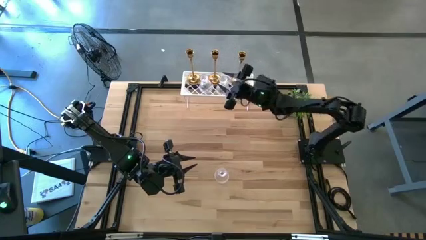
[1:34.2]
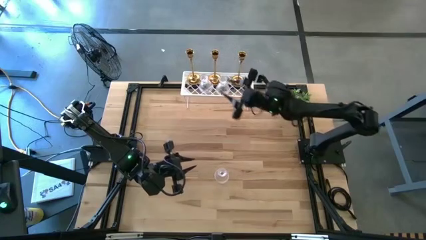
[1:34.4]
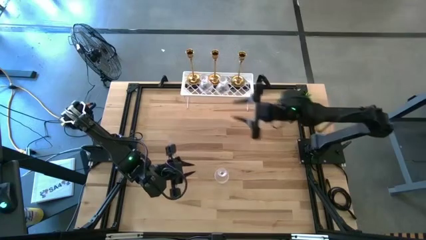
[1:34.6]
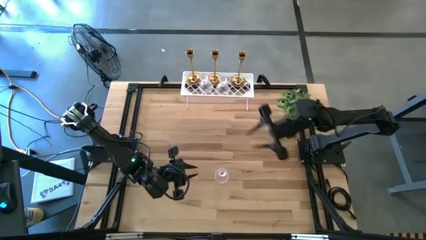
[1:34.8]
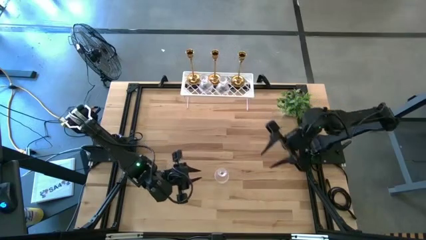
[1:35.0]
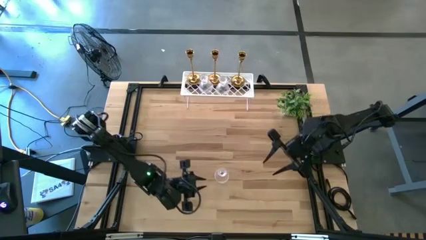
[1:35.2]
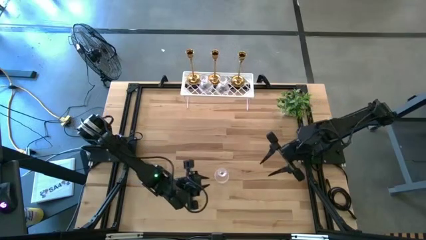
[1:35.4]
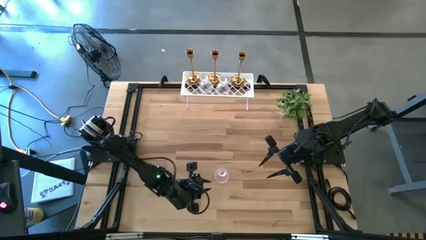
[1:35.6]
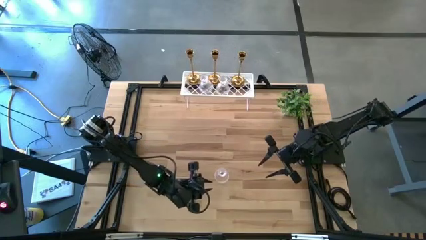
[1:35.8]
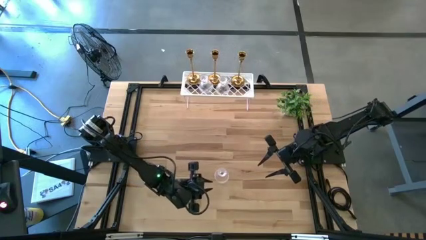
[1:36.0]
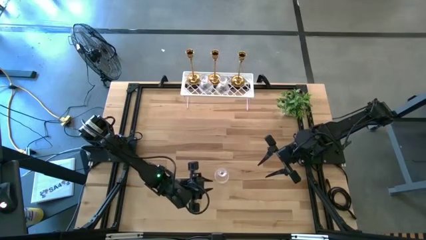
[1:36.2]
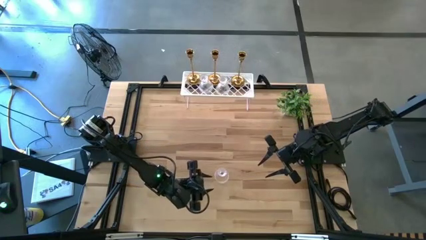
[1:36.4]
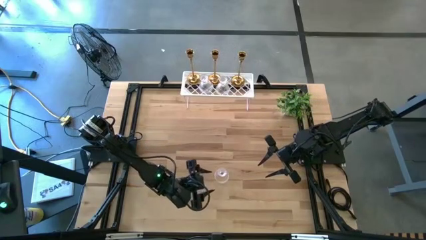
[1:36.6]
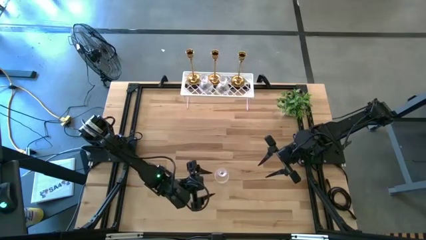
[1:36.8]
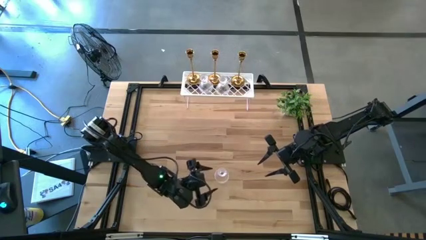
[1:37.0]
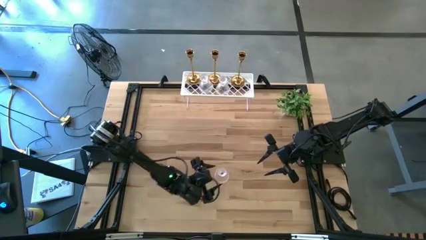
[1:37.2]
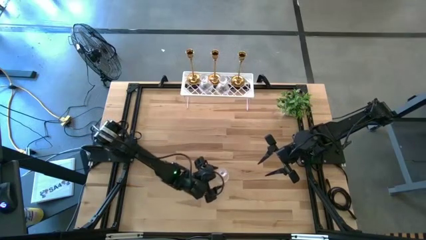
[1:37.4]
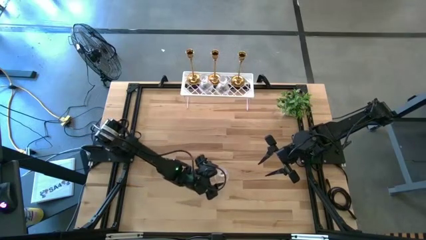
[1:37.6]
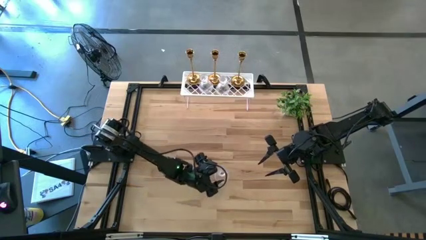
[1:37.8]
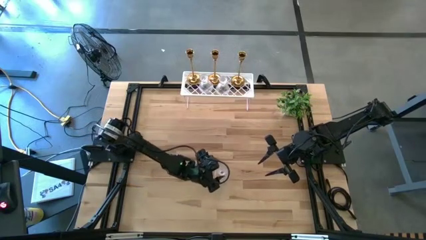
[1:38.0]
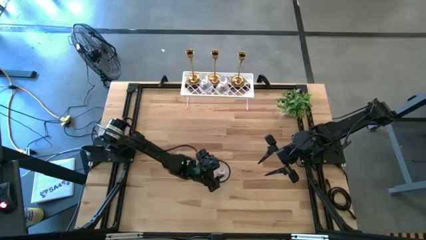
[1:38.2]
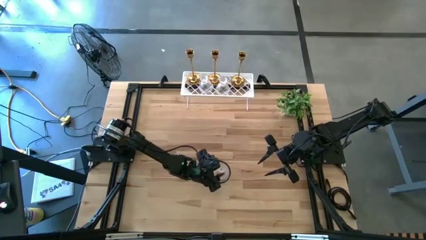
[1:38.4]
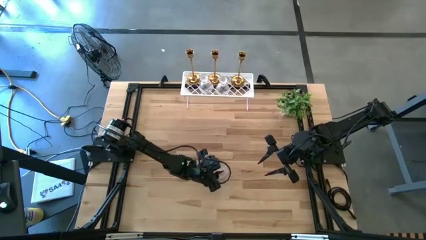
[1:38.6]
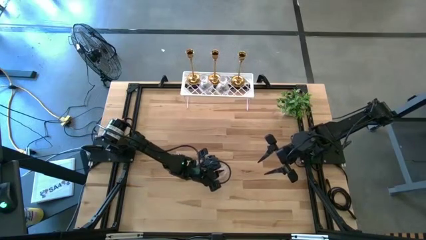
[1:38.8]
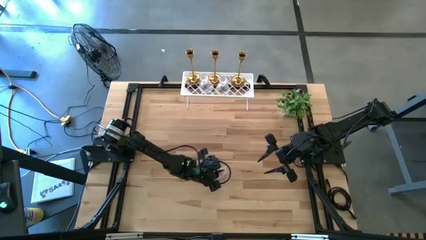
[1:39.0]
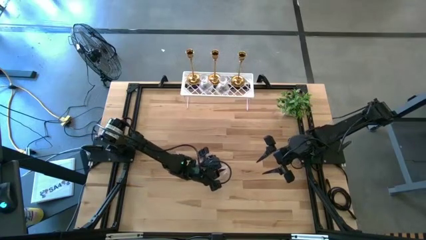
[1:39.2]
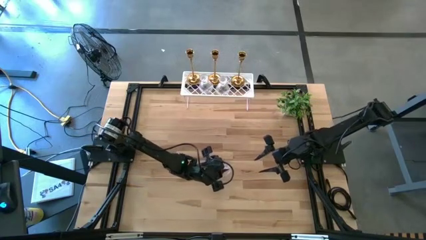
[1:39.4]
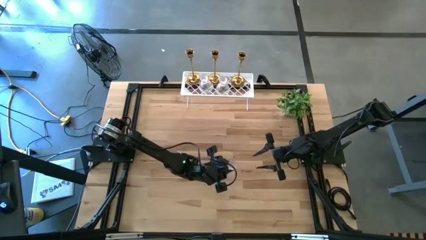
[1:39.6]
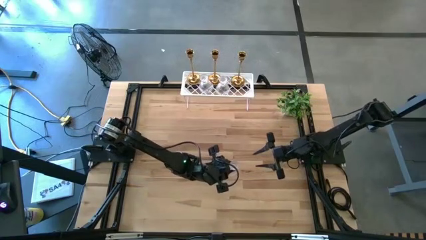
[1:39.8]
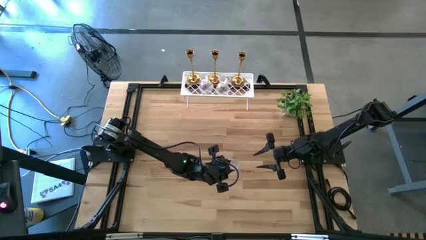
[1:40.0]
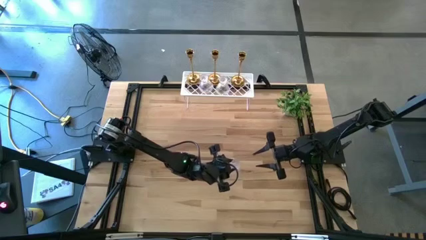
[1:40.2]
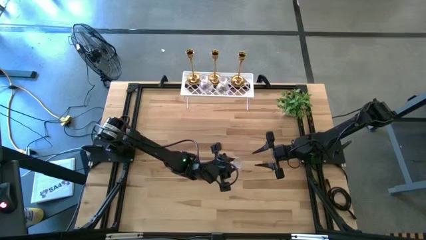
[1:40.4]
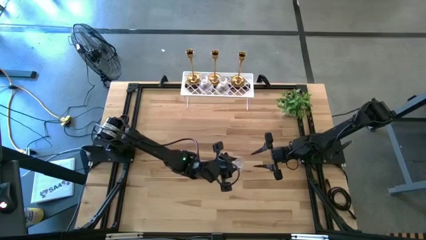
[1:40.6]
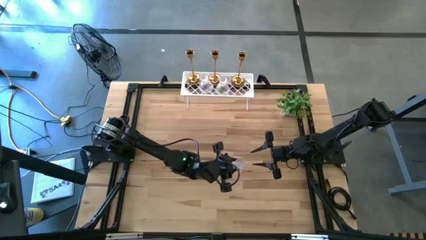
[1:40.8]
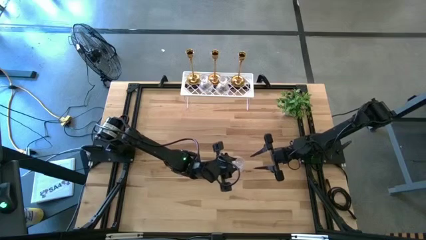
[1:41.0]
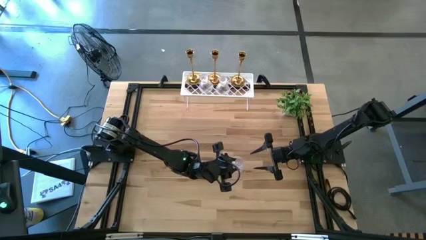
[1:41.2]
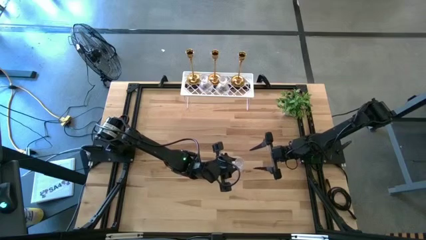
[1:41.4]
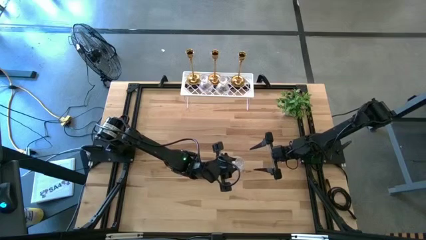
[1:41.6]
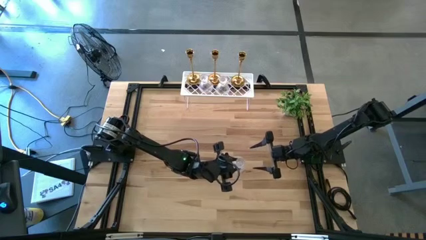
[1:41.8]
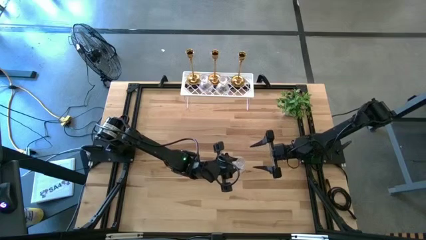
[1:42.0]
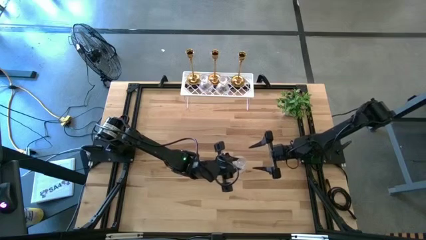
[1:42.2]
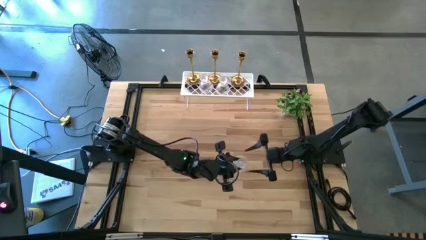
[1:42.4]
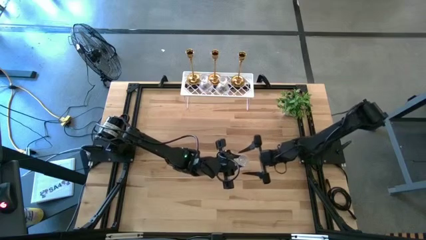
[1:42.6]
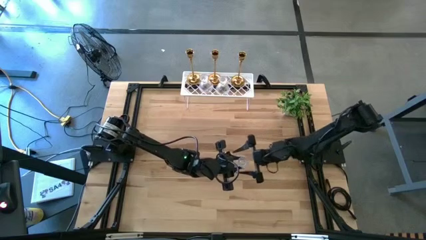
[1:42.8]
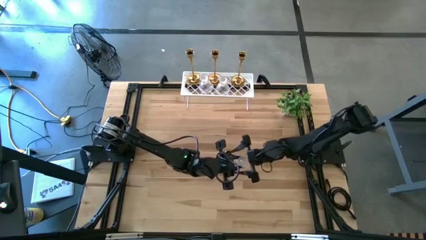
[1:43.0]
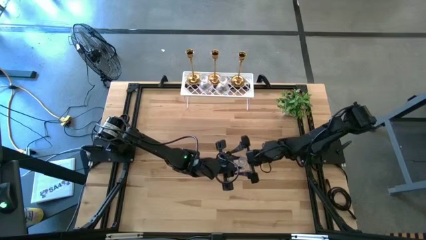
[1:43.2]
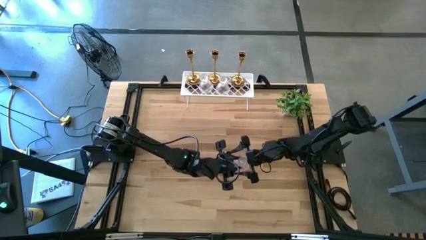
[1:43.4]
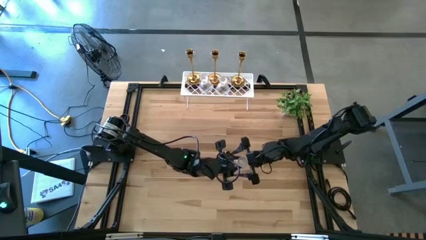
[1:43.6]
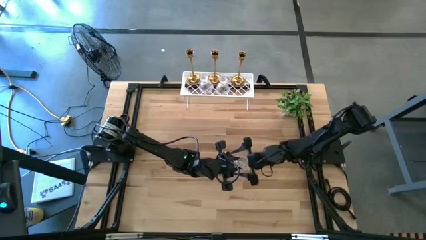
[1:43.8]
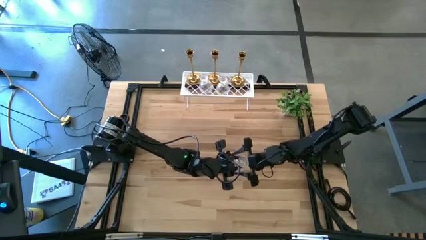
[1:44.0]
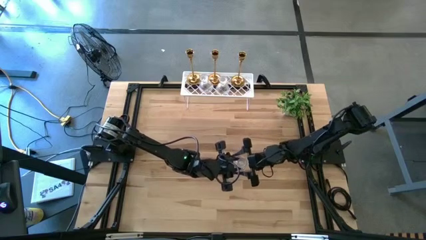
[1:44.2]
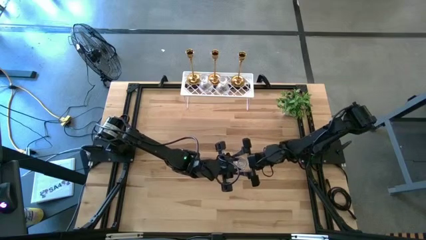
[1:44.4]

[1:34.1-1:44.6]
Task: Pick & Place candle stick holders
Put the glass candle holder on the shelf

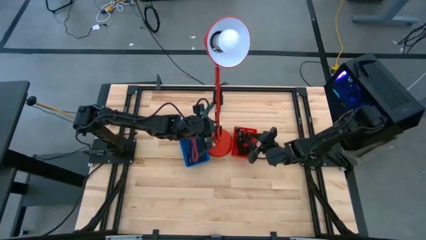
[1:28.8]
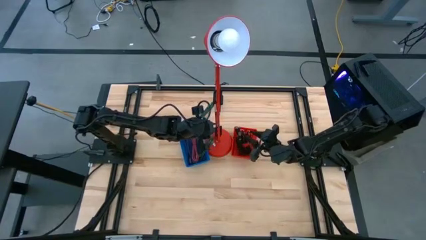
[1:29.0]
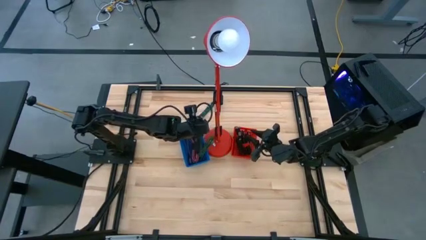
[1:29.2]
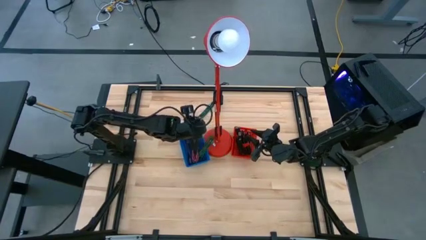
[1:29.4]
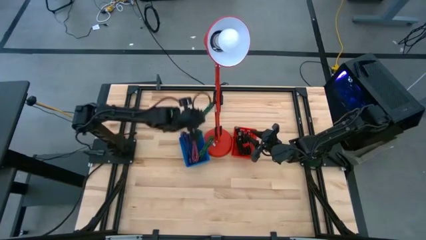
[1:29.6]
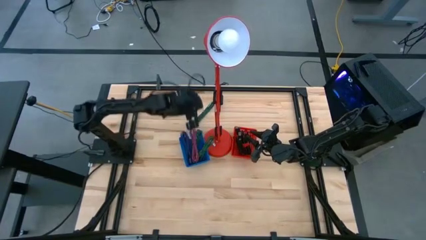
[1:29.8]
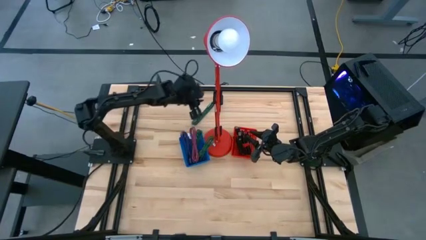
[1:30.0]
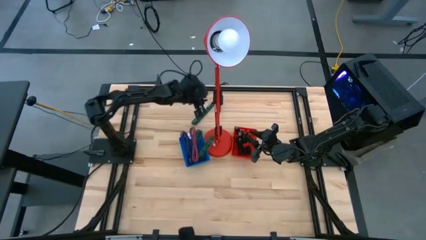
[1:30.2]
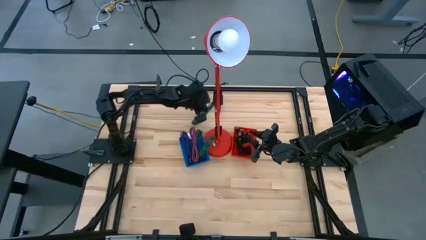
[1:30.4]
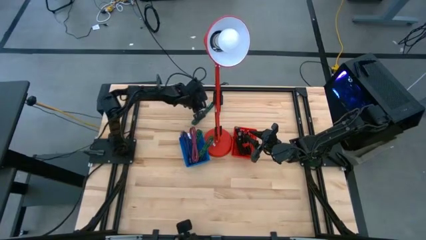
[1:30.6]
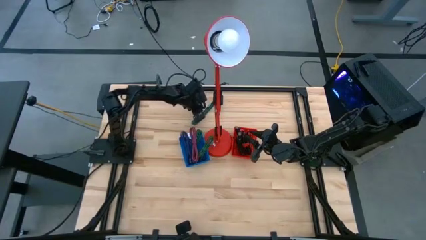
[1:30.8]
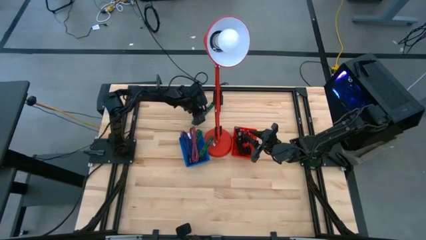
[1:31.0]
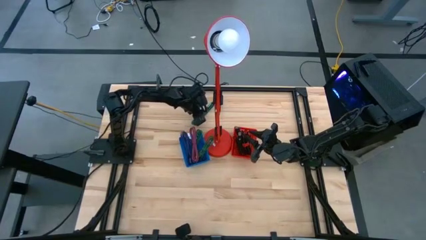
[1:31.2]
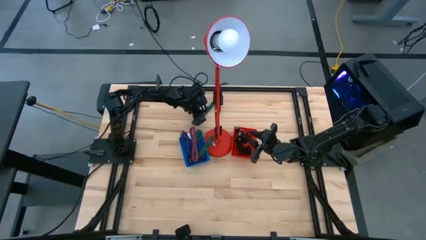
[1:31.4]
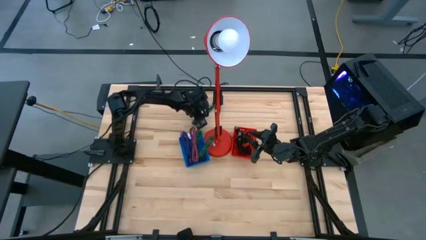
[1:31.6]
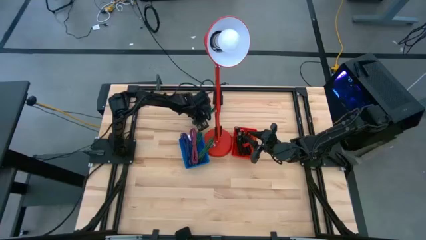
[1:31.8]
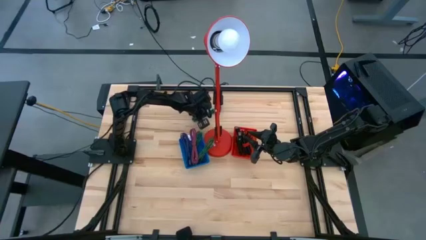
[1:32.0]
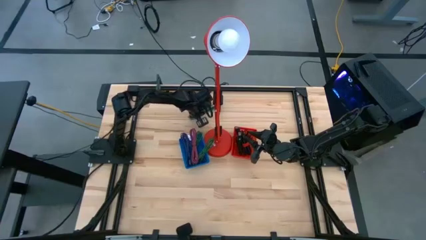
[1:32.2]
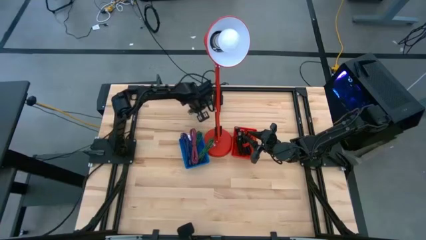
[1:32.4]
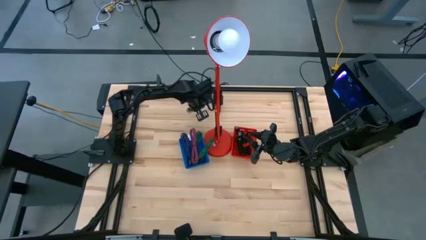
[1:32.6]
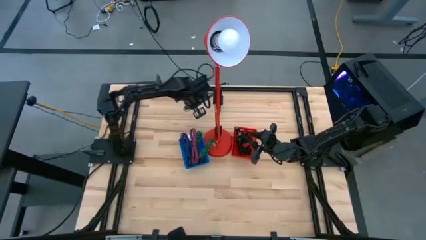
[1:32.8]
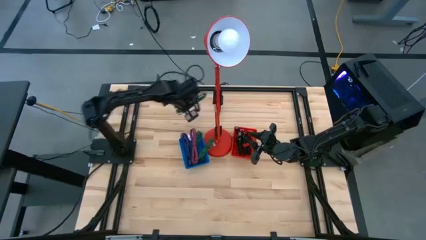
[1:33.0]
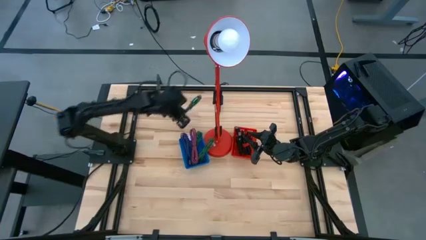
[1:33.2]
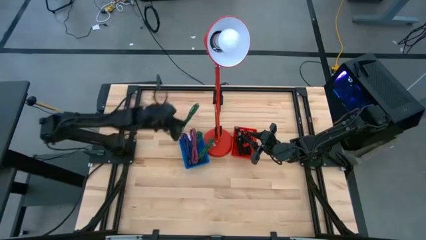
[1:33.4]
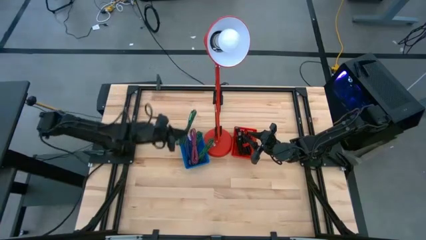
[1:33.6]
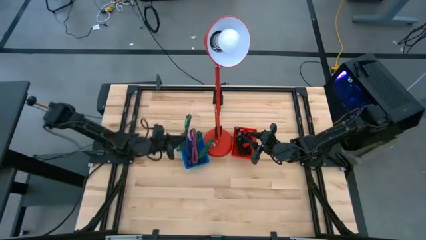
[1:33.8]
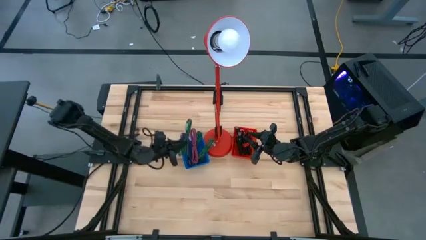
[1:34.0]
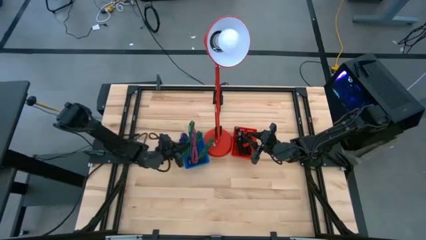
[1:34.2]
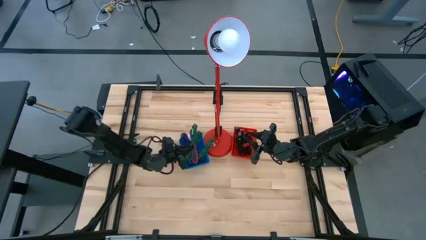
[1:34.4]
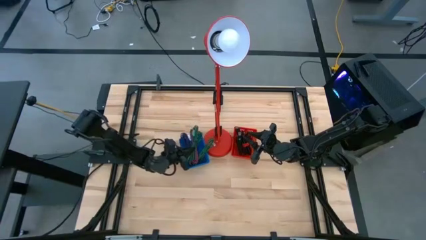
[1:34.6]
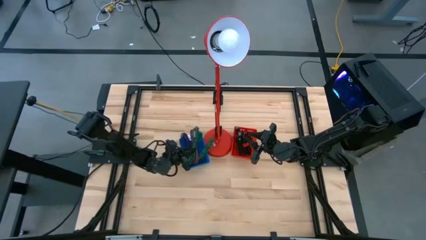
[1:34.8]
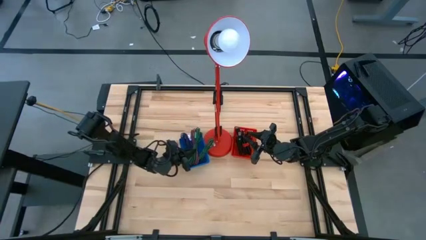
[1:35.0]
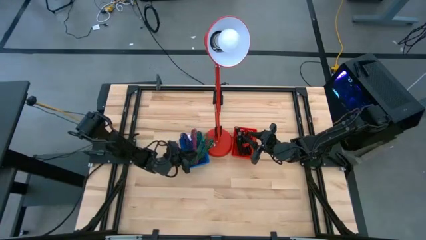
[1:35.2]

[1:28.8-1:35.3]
Task: Pick & Place USB Port
Put the green charger cable into the blue bin
